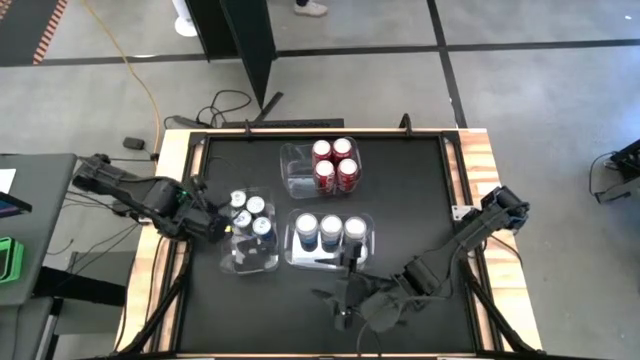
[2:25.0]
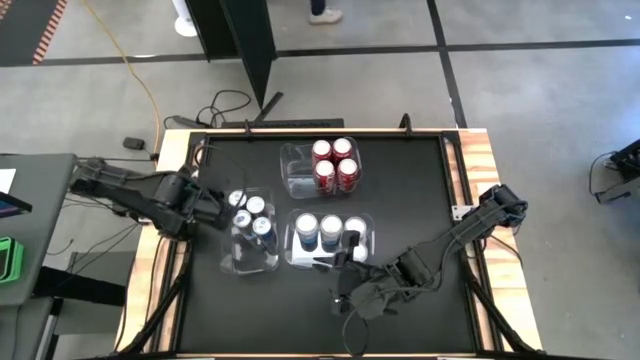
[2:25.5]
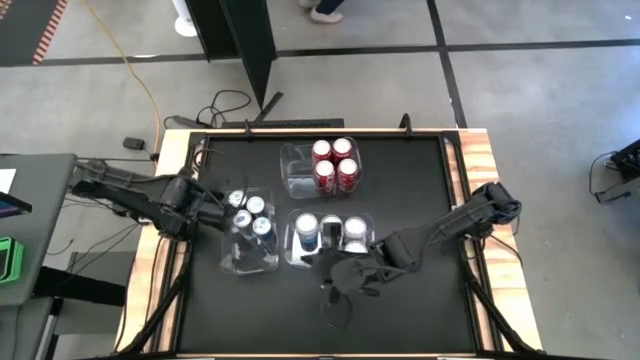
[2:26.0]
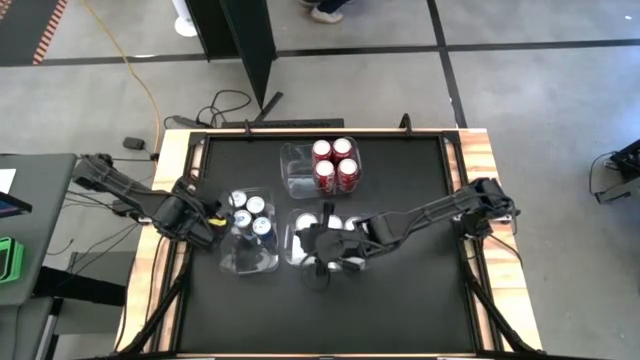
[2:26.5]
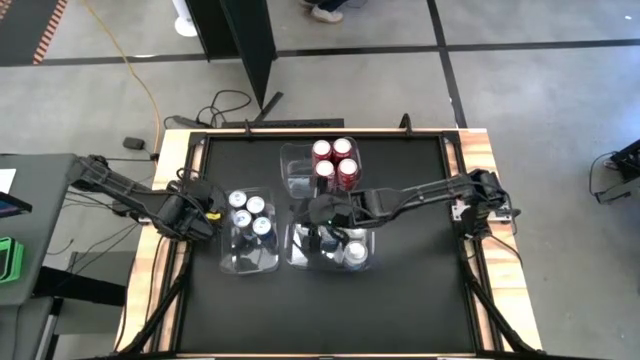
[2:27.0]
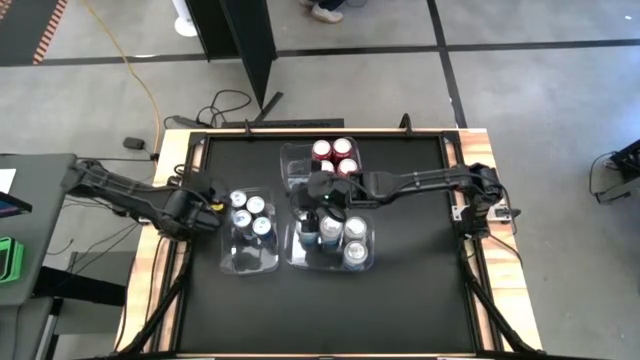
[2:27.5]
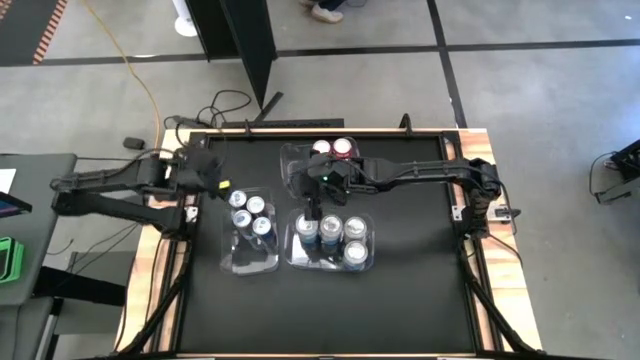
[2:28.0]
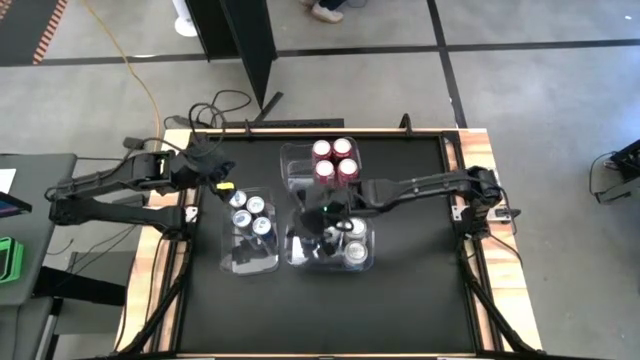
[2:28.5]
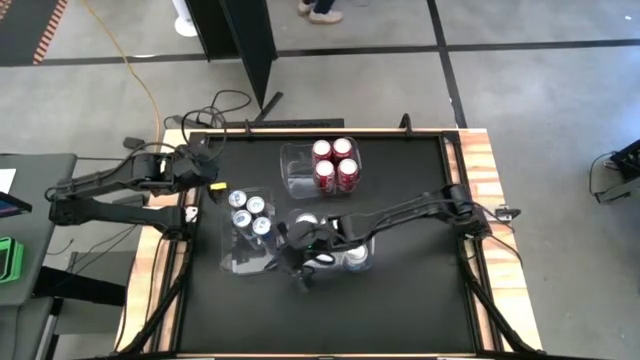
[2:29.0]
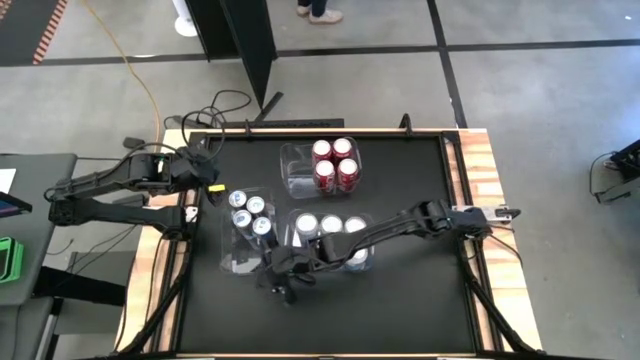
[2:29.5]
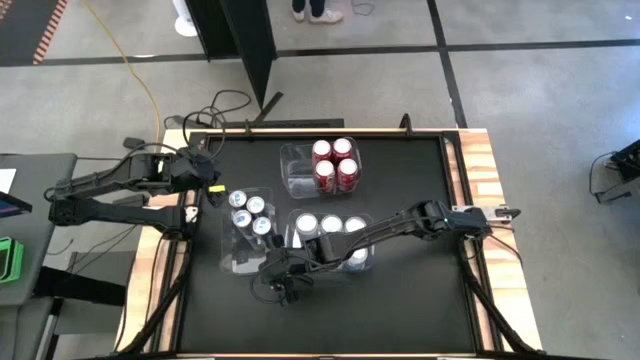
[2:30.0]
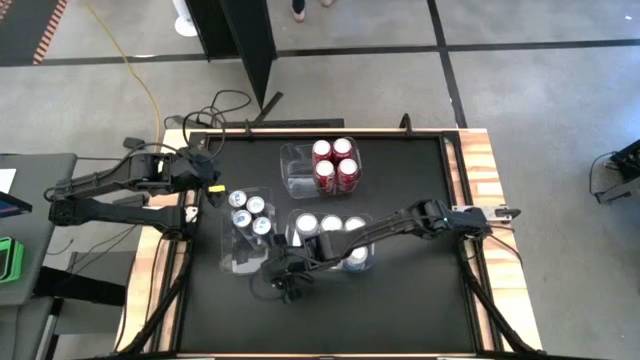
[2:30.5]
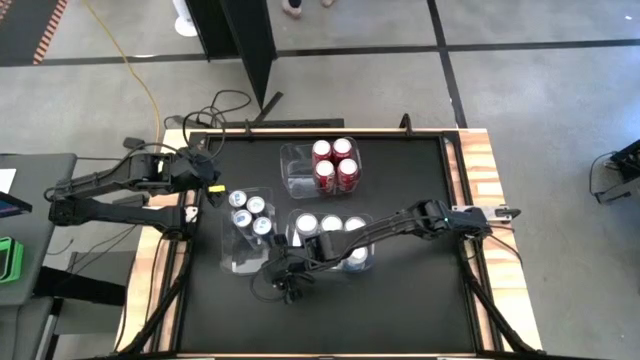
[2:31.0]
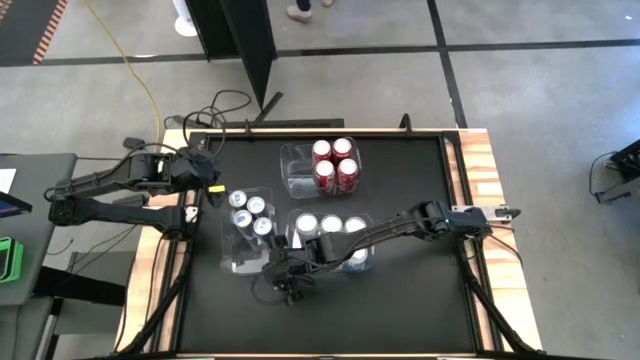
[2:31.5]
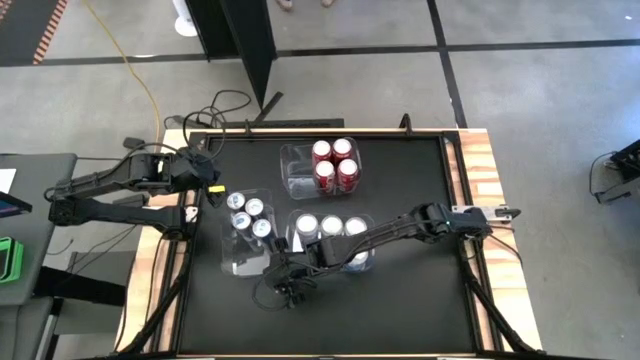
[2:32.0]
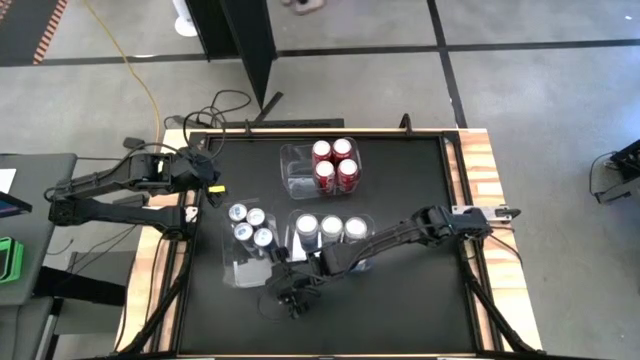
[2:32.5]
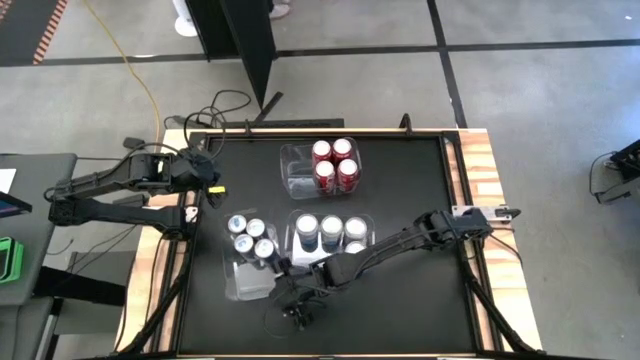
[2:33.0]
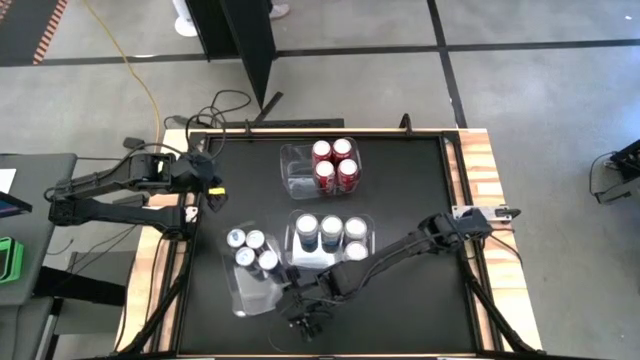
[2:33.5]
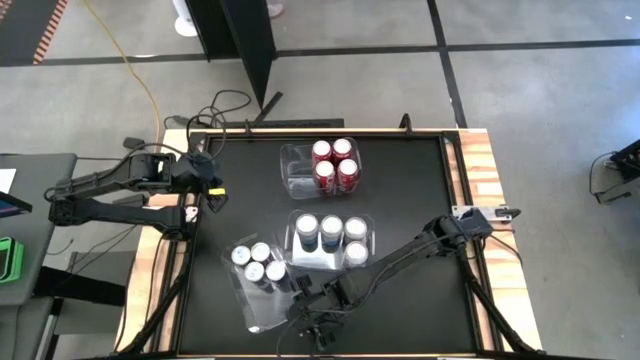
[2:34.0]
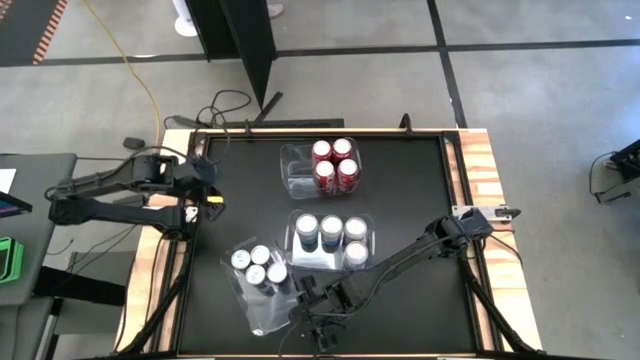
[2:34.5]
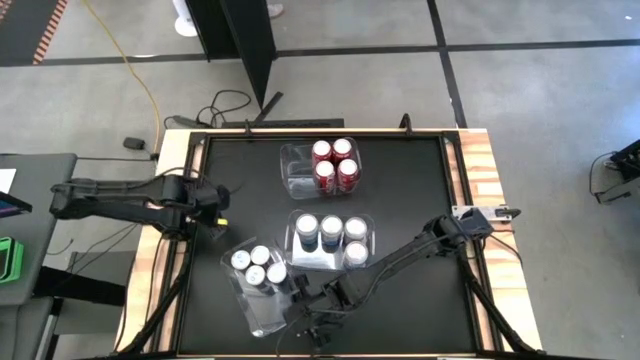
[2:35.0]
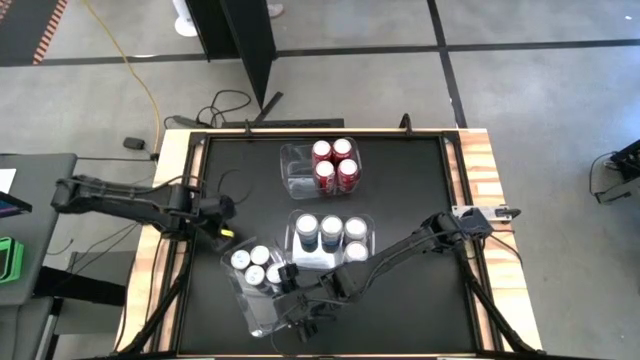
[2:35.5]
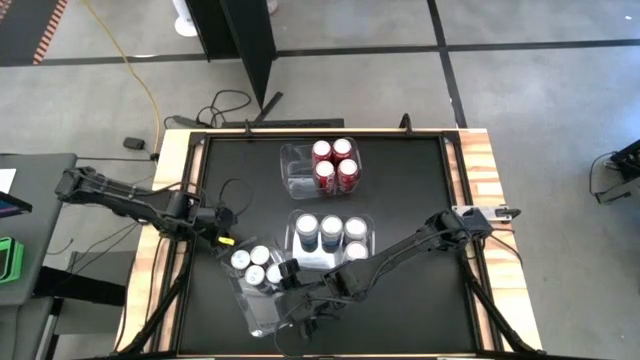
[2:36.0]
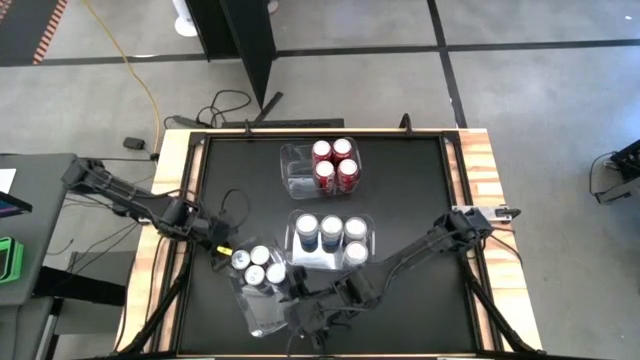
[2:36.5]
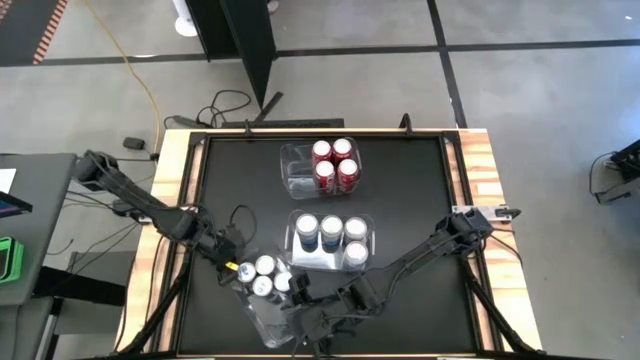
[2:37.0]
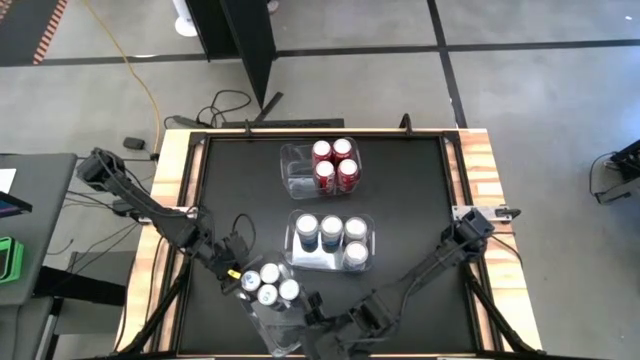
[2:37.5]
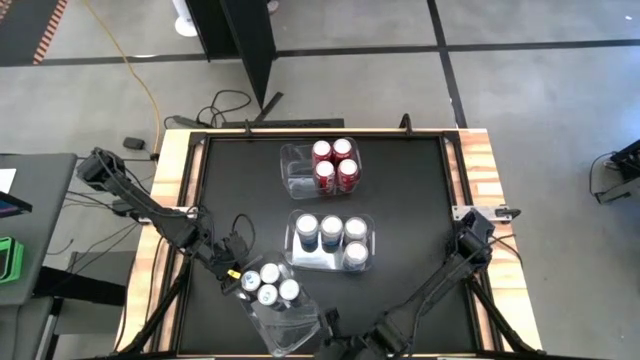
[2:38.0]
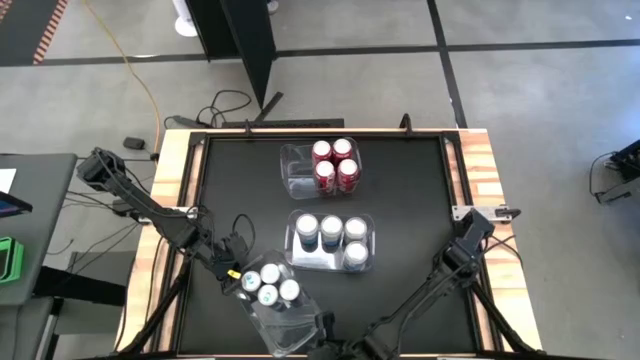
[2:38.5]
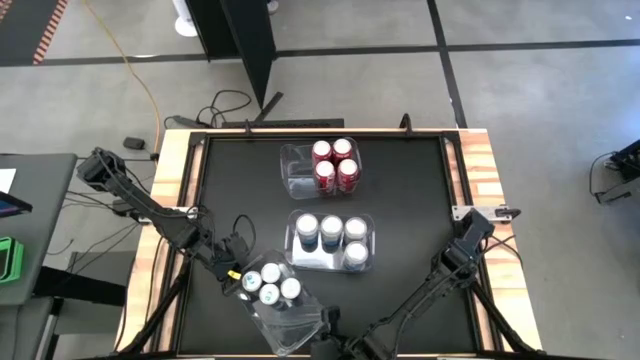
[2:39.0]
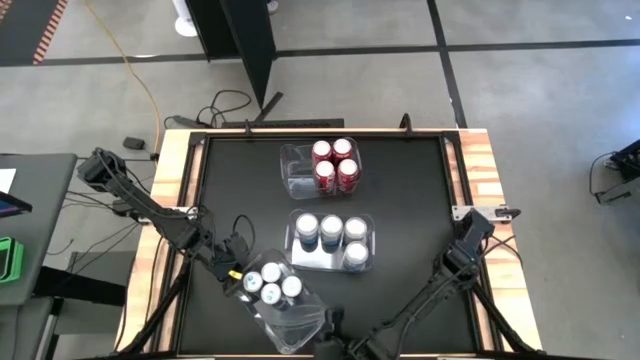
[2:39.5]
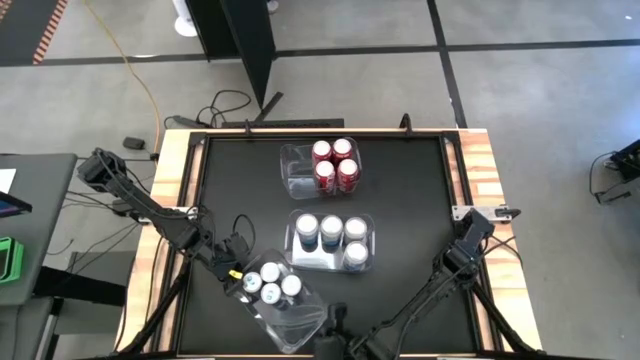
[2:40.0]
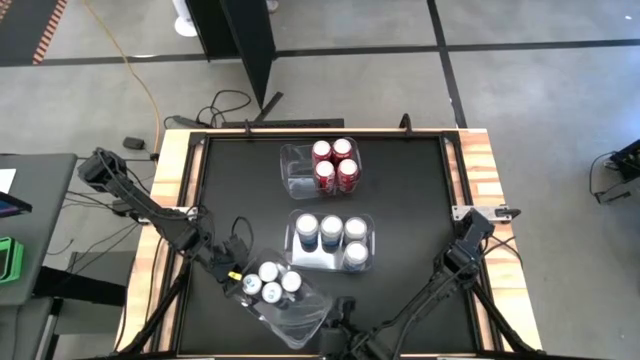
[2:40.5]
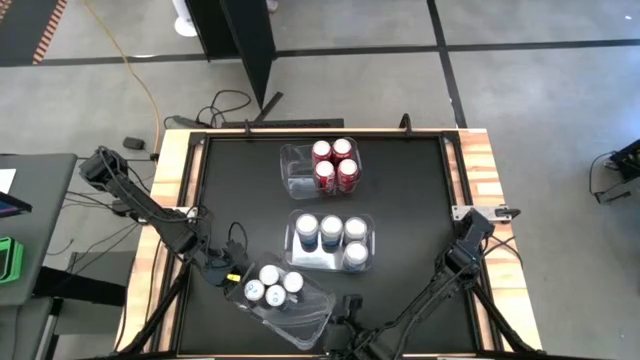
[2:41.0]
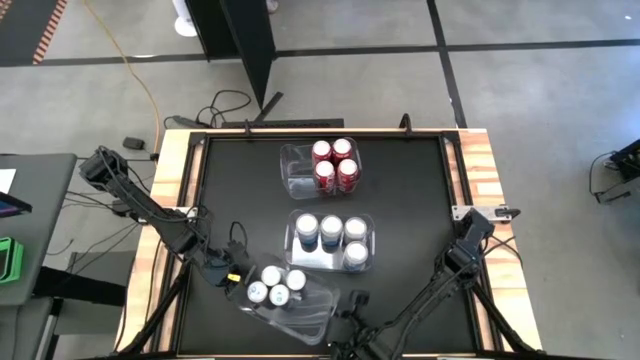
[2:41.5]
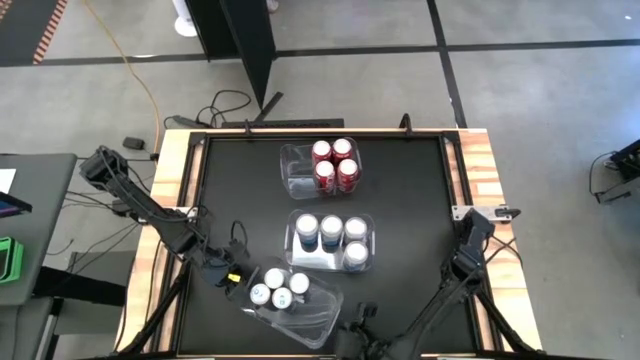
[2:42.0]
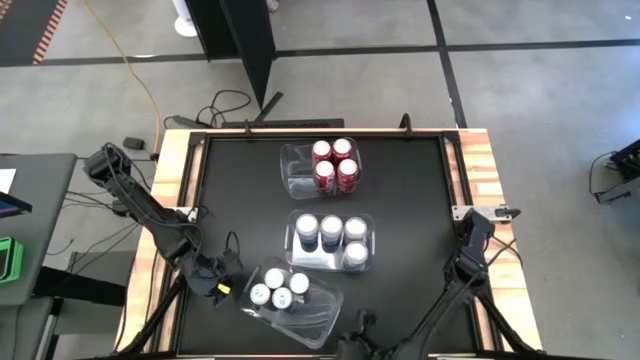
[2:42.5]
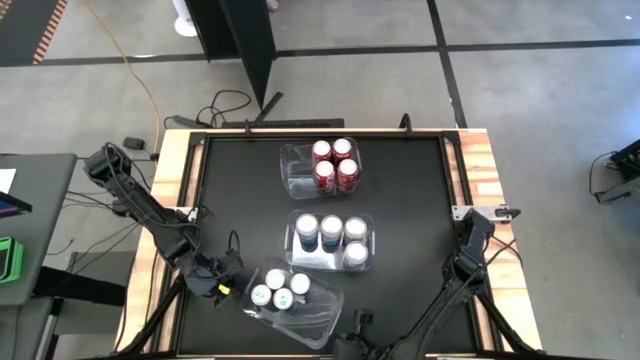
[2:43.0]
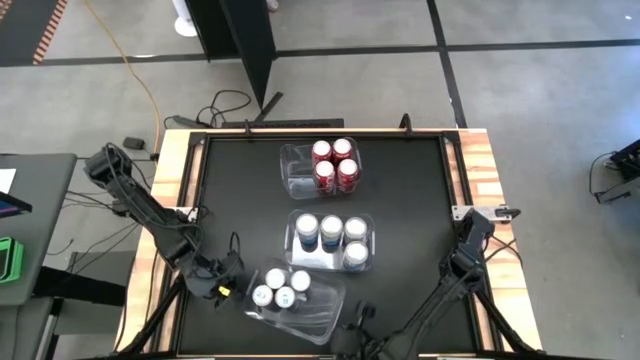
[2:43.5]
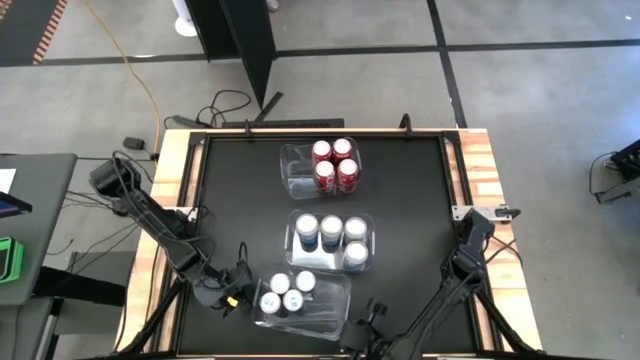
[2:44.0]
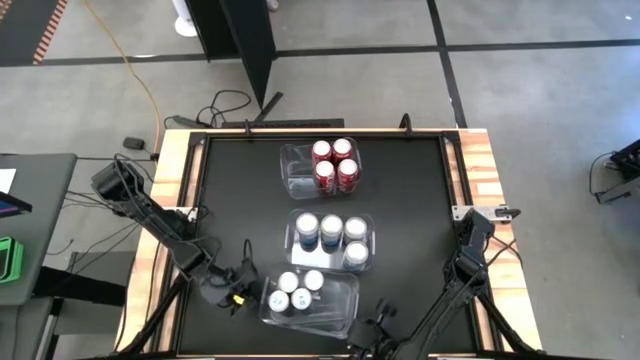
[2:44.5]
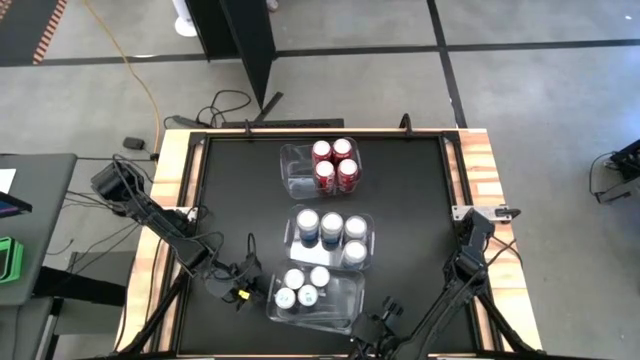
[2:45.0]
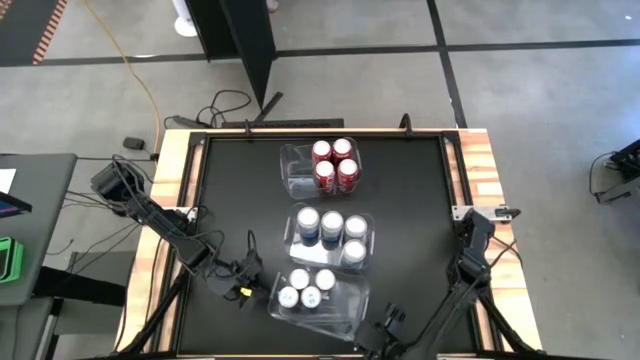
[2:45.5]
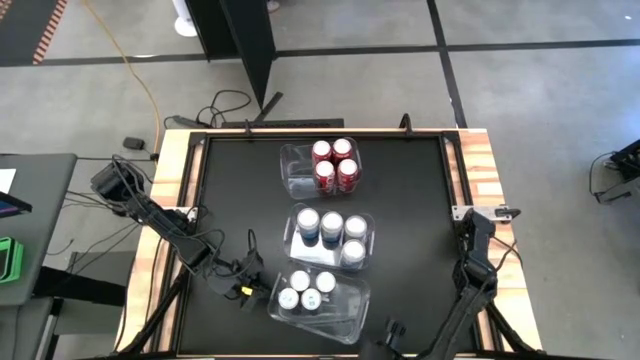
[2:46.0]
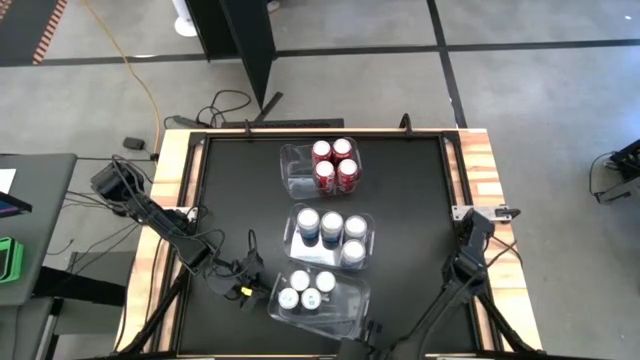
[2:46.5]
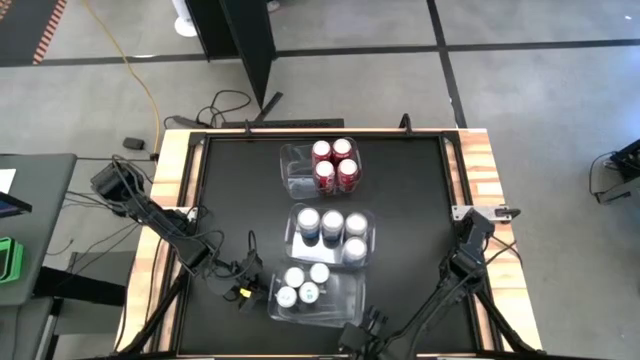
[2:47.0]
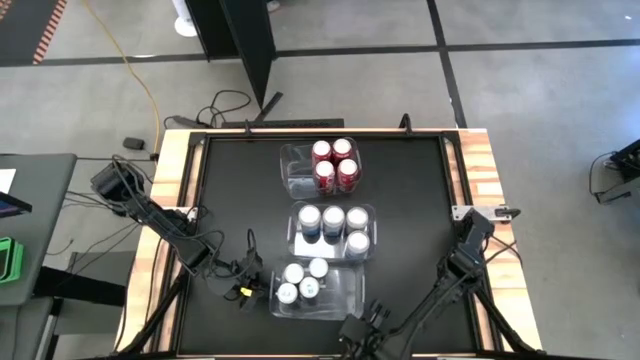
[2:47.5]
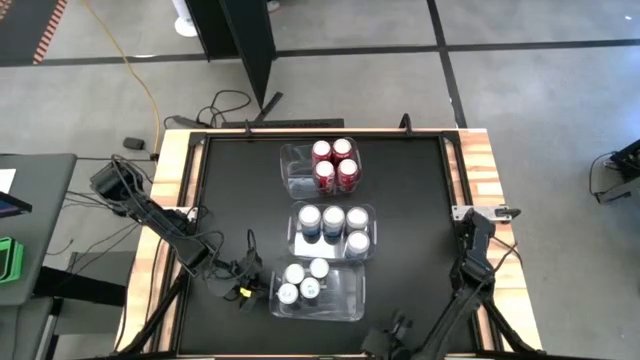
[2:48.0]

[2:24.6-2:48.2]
Task: Sort soda cans
Move the middle left transparent bin to the bottom of the table
